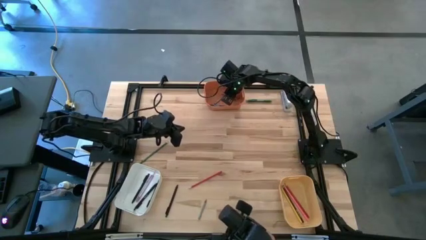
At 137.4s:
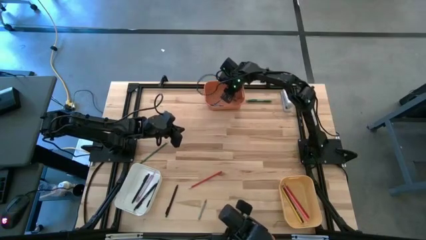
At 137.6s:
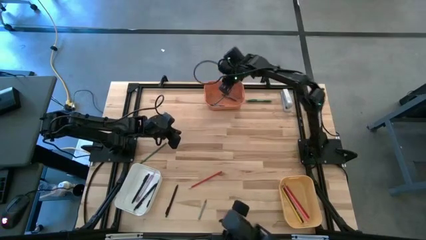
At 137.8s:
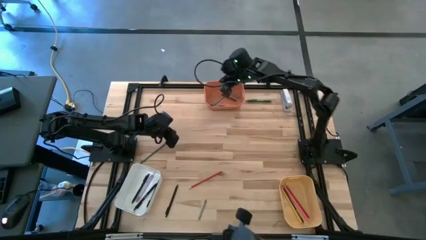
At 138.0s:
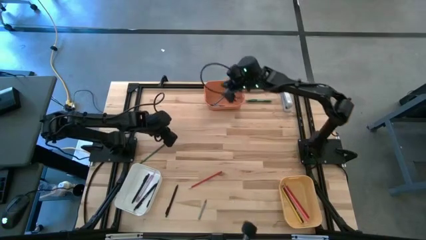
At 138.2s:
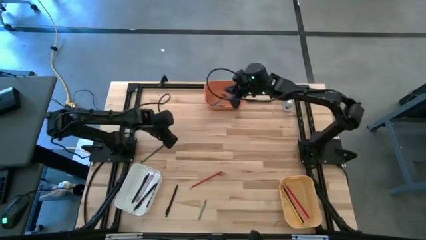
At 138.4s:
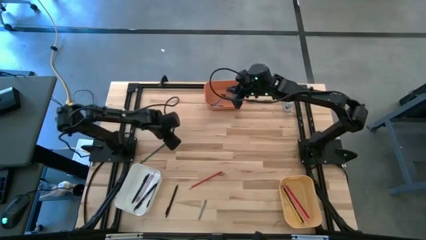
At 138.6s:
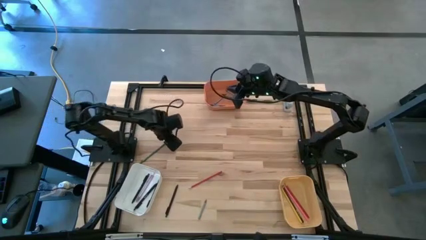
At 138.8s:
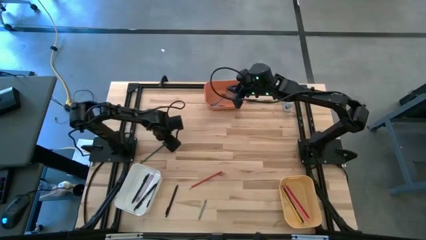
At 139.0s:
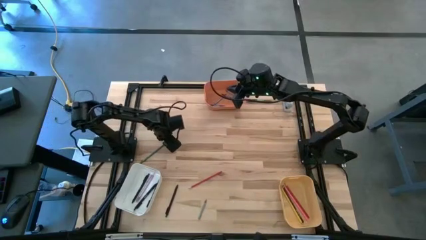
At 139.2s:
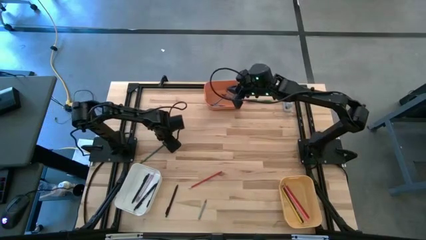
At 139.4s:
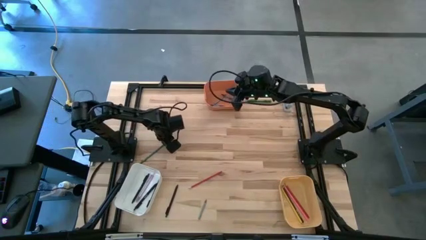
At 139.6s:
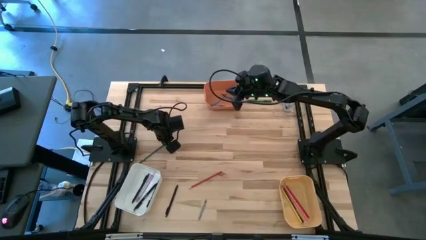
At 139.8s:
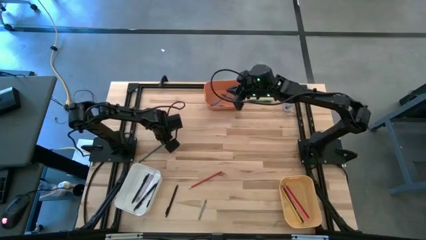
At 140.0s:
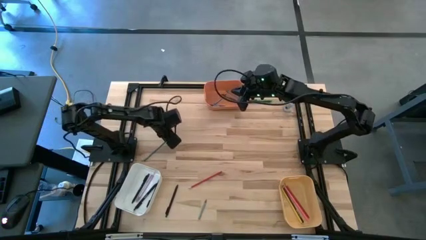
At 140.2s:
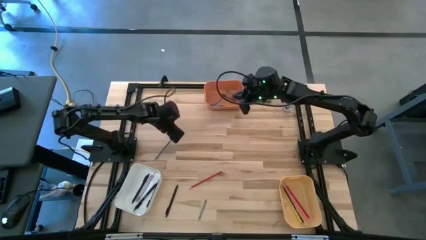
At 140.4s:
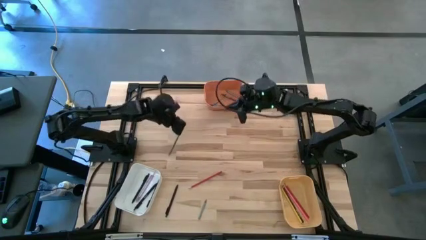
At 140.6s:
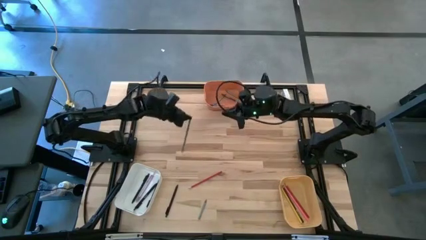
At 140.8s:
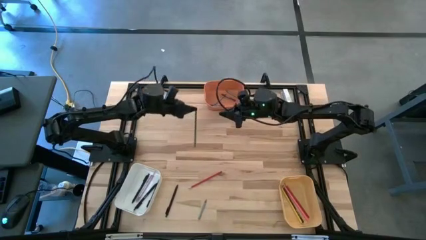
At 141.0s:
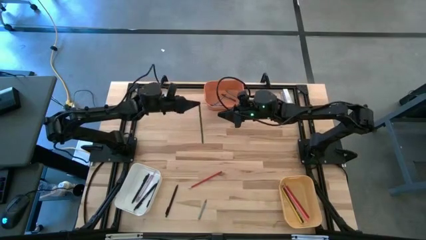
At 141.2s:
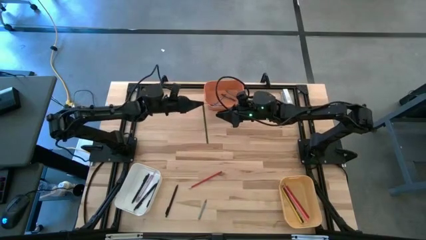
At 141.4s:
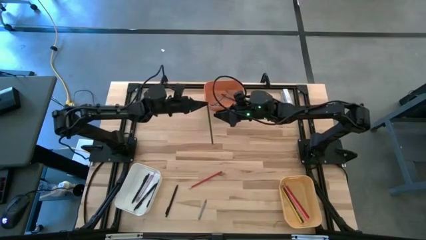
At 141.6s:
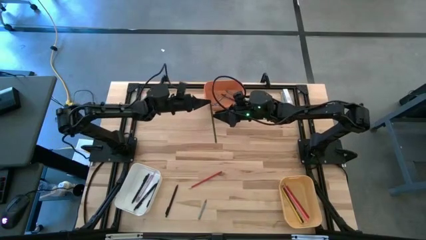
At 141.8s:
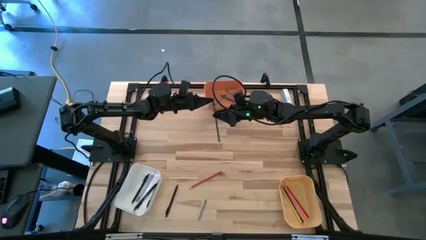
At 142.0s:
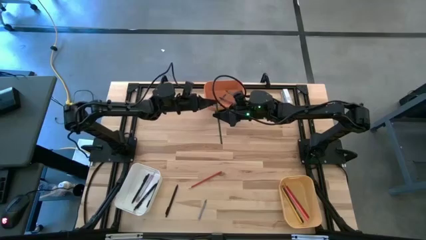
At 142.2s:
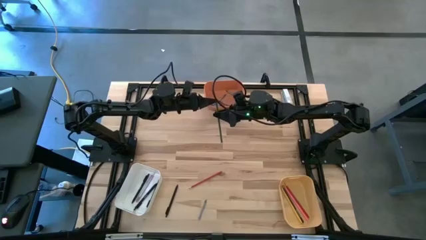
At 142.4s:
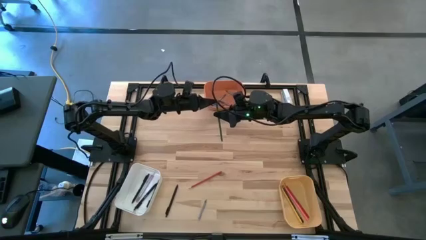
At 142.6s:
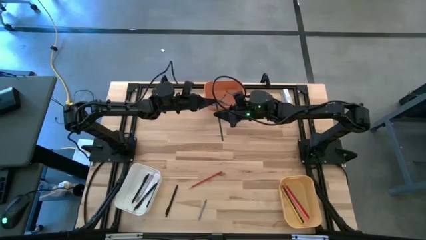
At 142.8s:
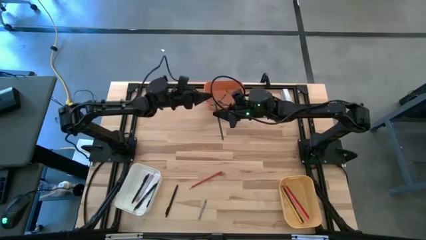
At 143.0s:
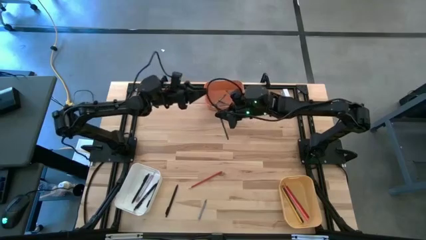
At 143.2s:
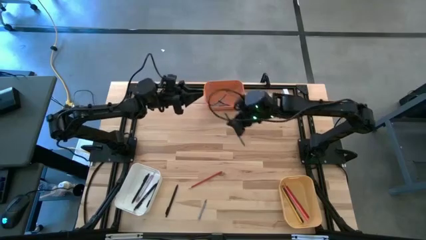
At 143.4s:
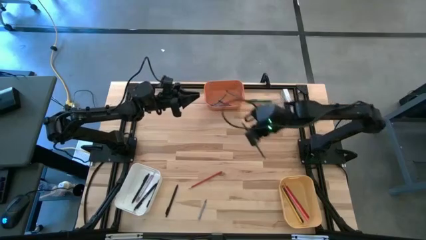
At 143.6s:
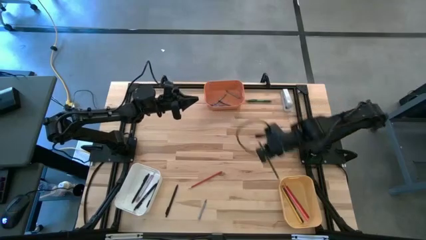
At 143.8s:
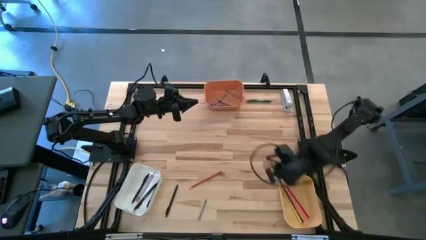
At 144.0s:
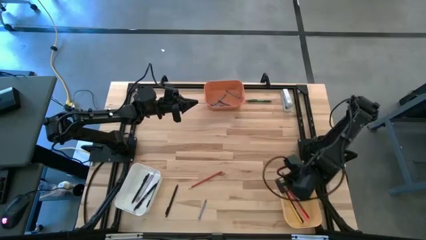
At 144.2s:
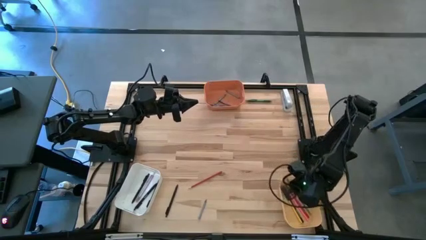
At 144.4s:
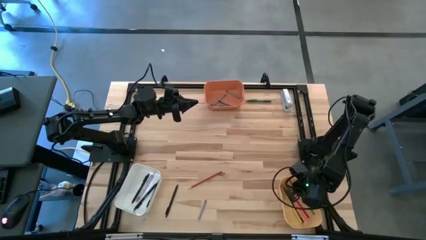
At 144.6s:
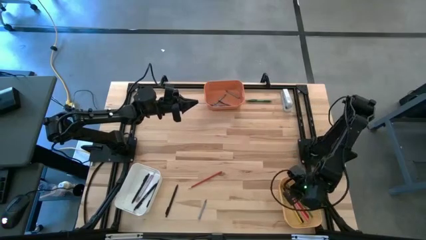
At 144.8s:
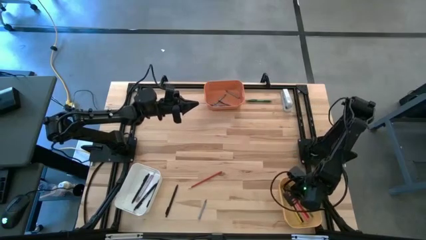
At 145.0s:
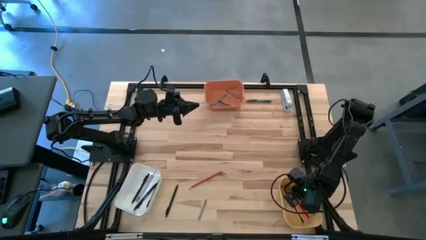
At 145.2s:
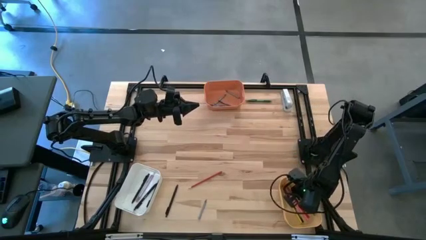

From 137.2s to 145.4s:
Task: Sort crayons/erasers/pens/pencils in bins
Put the green pencil into the yellow bin

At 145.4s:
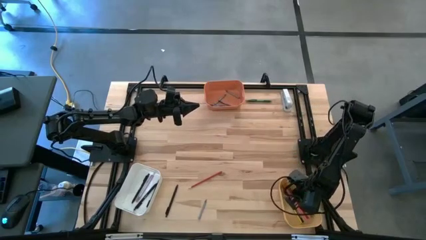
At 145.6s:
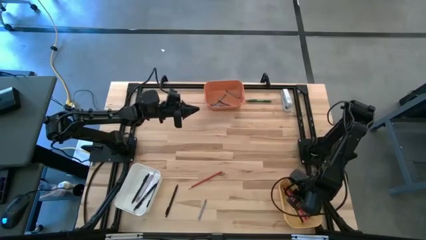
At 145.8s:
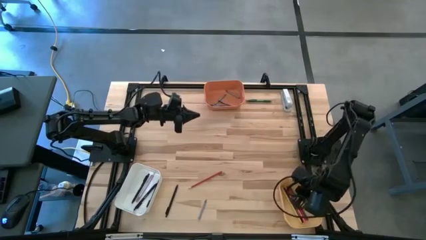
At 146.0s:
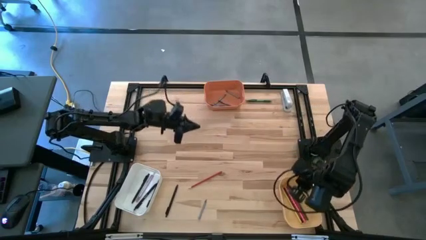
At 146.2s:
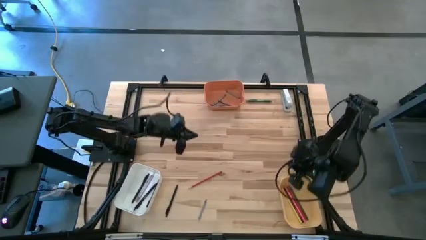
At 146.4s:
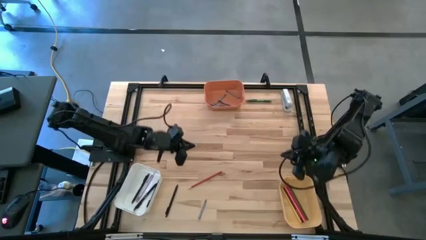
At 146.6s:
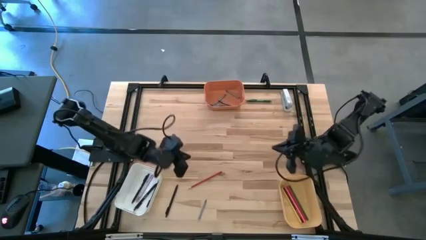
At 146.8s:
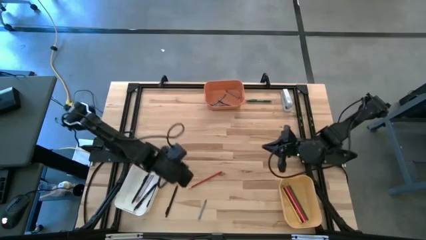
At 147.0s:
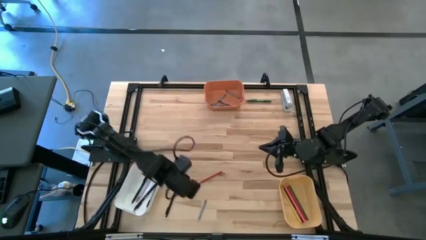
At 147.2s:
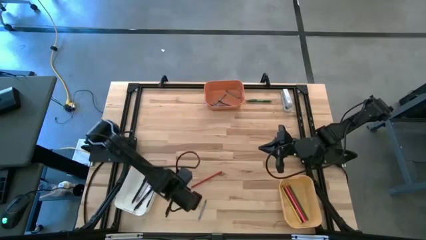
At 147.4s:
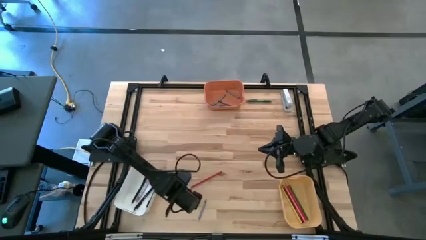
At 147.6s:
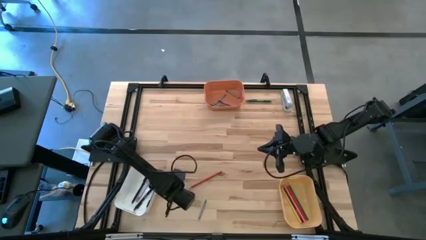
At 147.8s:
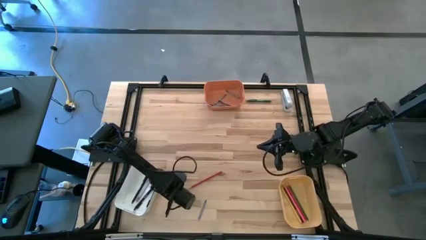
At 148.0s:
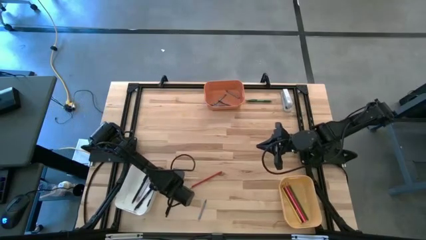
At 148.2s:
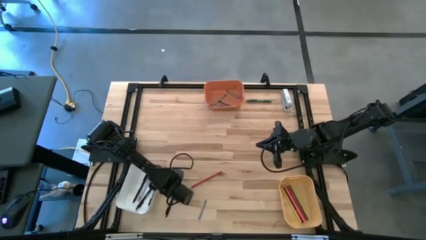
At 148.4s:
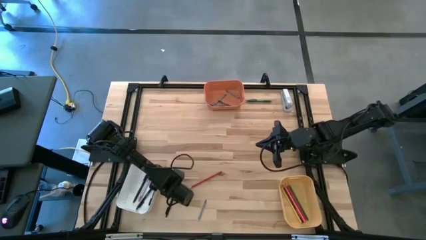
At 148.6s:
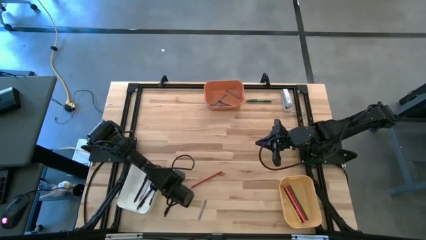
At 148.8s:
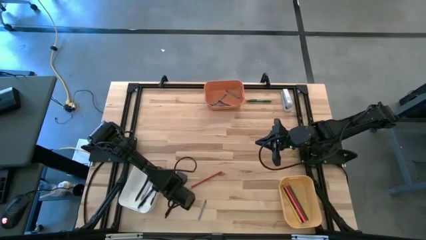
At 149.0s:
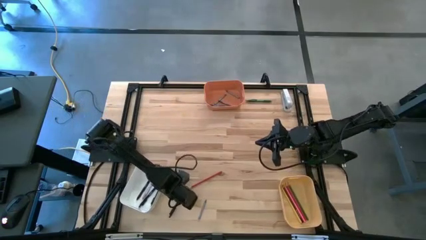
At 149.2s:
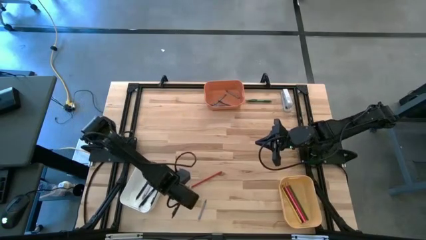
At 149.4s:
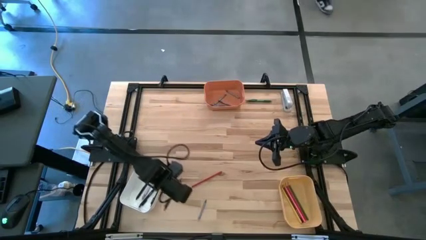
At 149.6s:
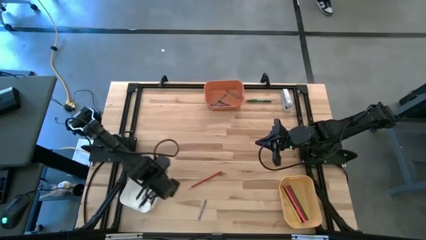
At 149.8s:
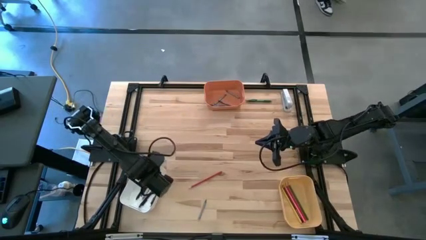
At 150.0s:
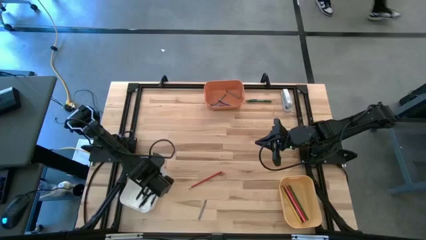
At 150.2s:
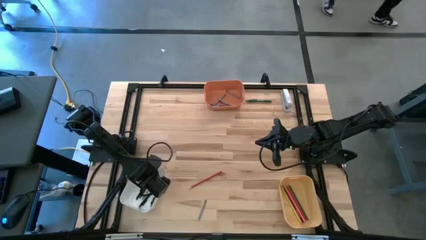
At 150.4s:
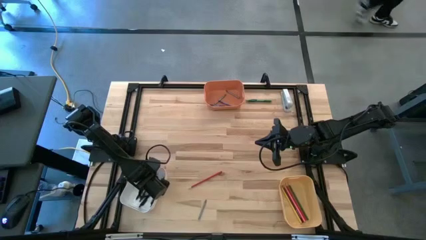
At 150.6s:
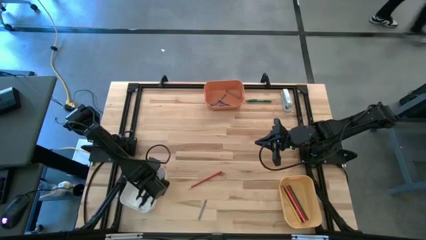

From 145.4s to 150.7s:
Put the black pen into the white bin

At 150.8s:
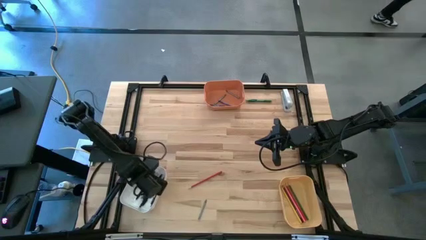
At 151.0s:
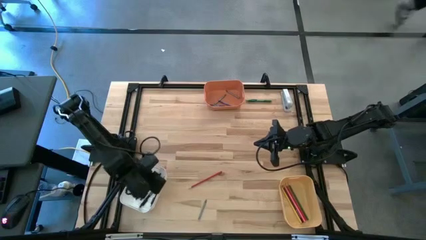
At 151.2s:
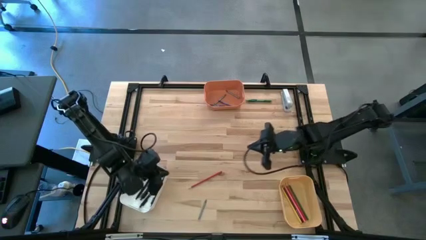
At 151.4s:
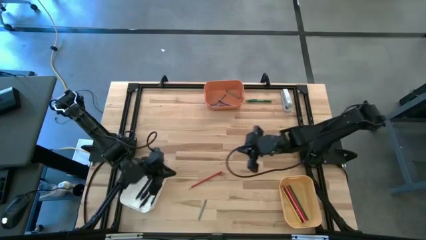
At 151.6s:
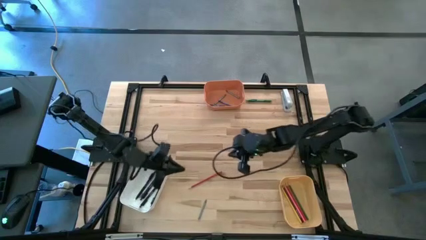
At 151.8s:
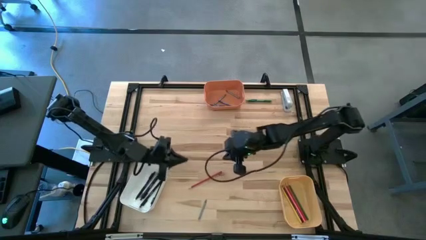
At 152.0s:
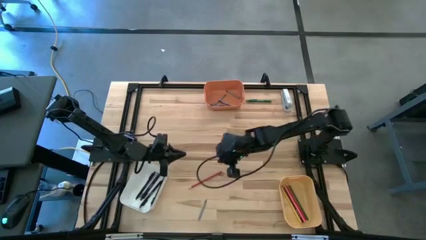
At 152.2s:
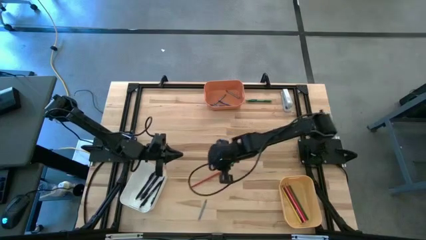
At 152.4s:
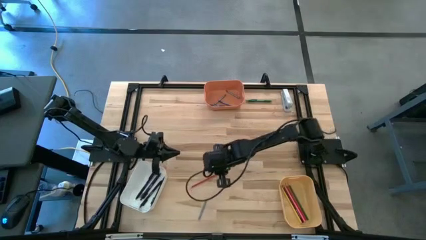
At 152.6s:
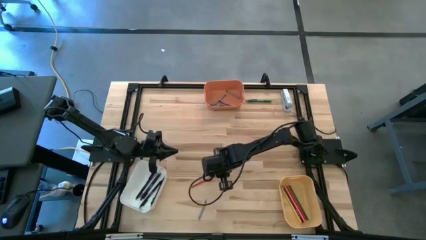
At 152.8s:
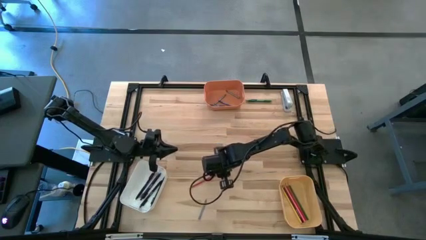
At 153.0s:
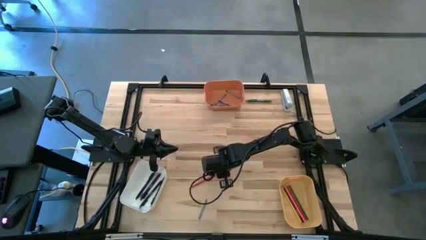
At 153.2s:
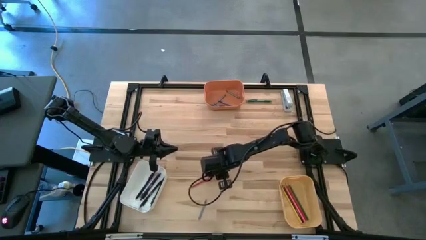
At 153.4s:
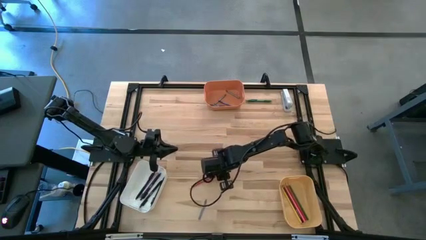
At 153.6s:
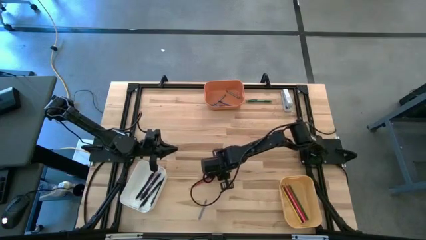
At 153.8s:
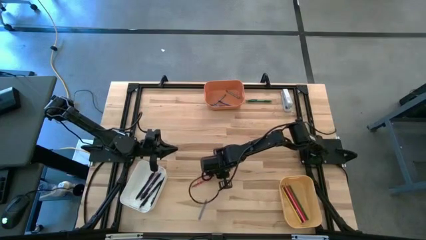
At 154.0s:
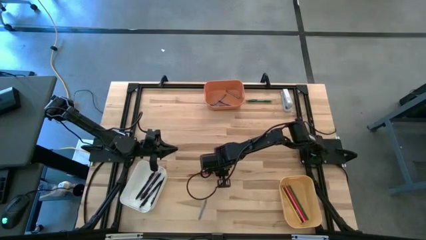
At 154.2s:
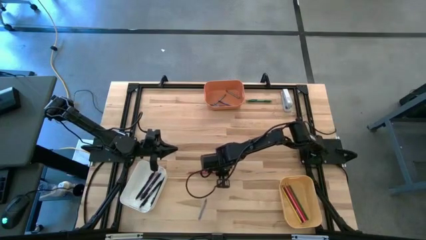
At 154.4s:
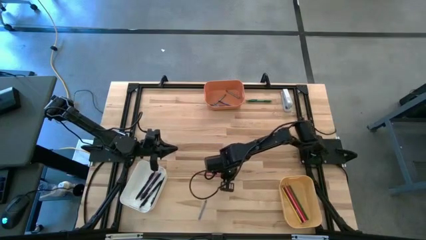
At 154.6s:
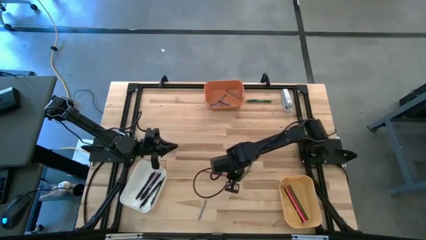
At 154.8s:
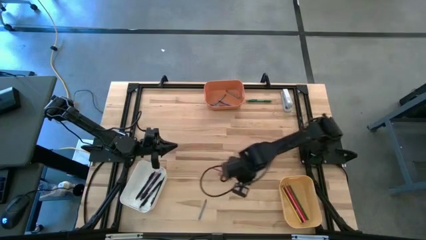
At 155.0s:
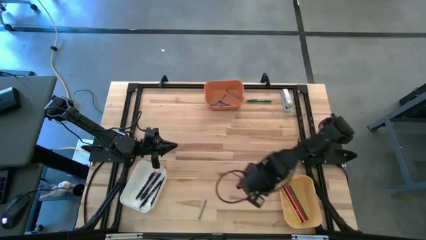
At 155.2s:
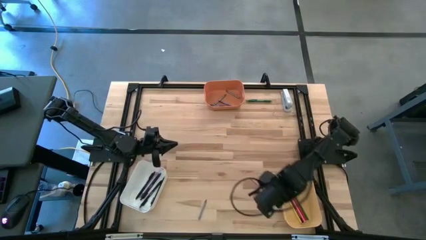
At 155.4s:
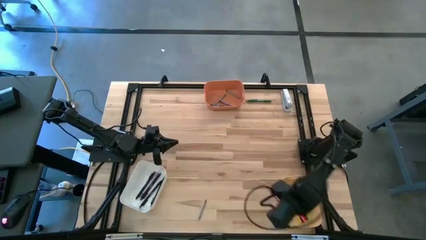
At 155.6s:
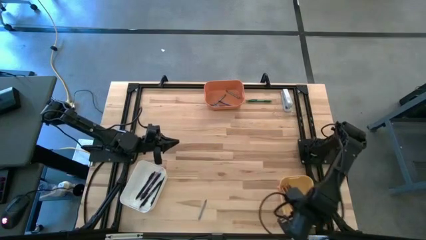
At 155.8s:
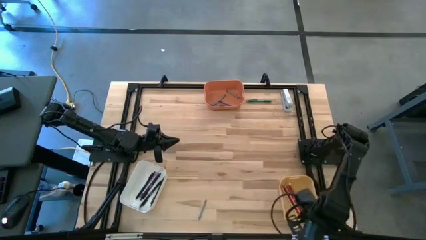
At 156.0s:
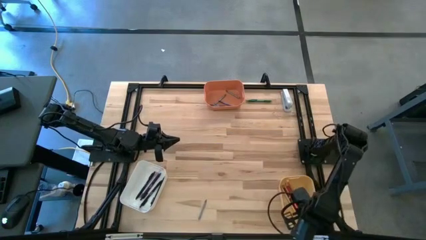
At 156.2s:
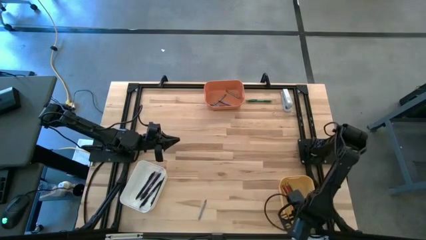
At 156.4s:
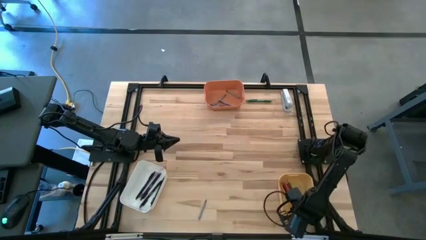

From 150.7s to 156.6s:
Put the red pencil into the yellow bin
